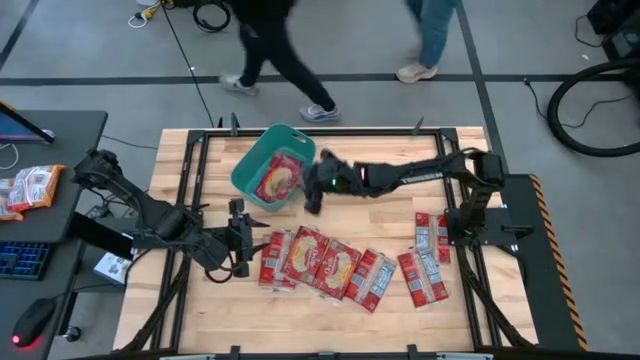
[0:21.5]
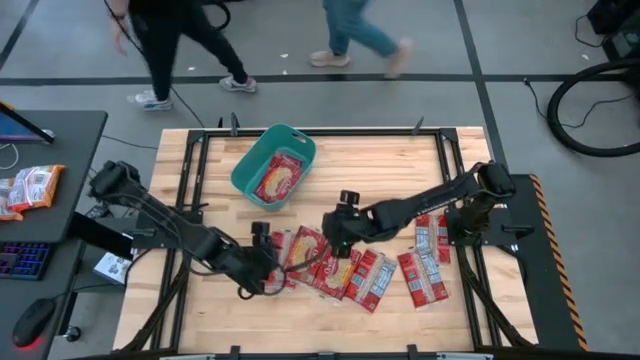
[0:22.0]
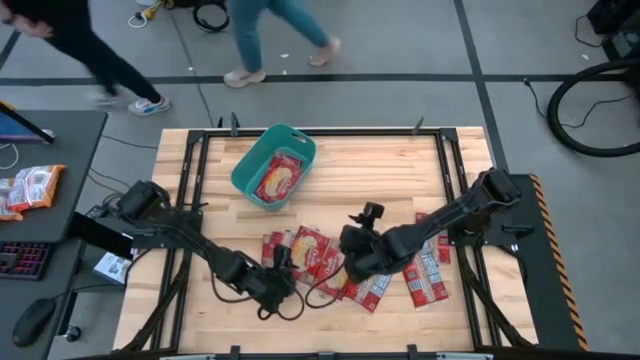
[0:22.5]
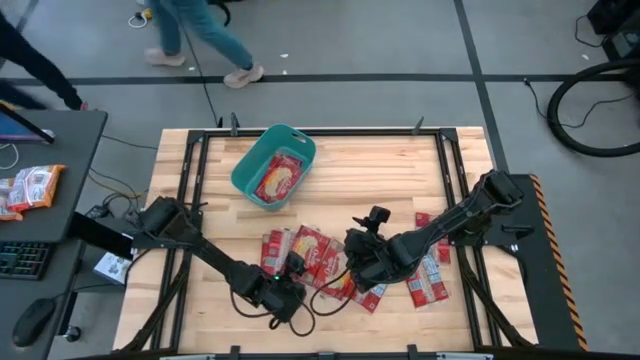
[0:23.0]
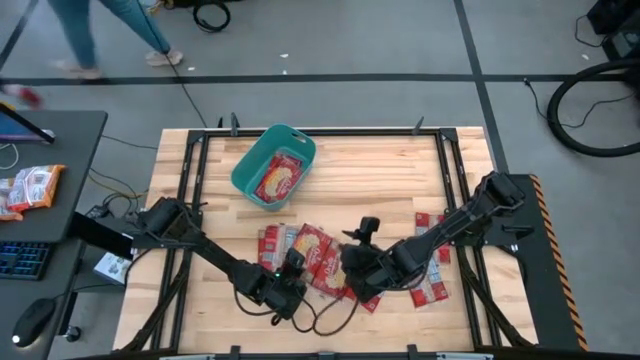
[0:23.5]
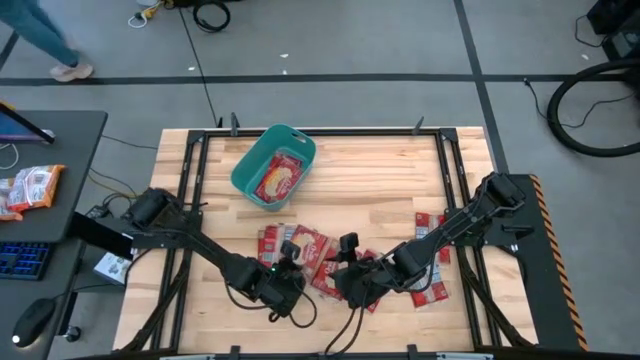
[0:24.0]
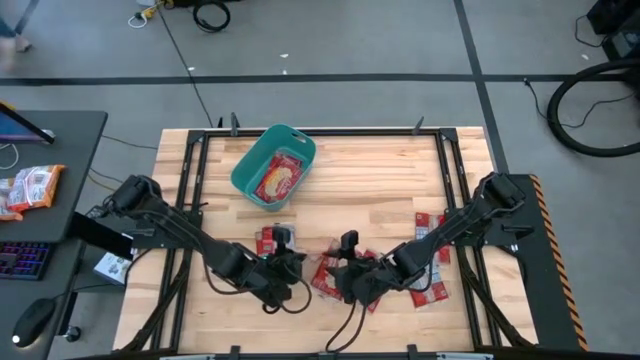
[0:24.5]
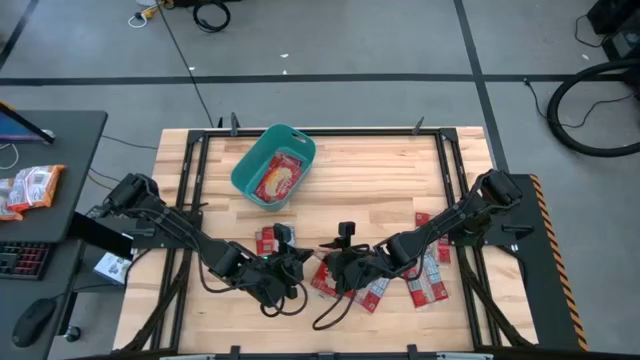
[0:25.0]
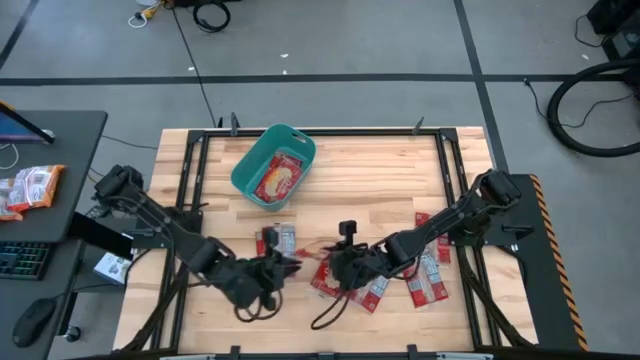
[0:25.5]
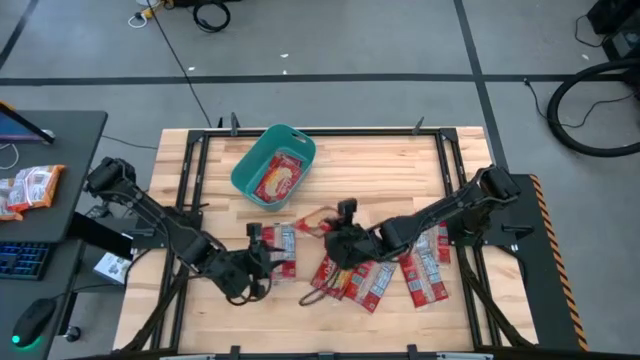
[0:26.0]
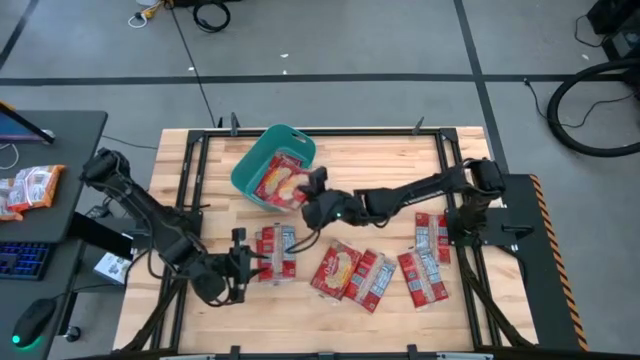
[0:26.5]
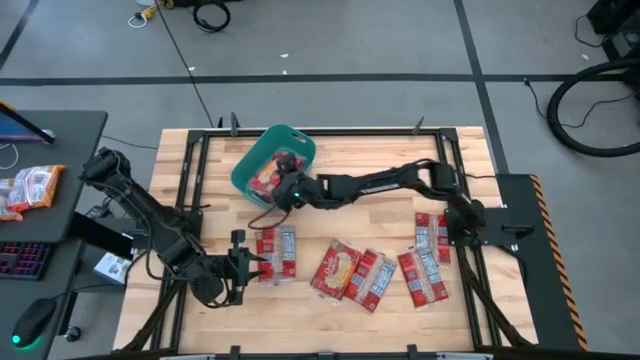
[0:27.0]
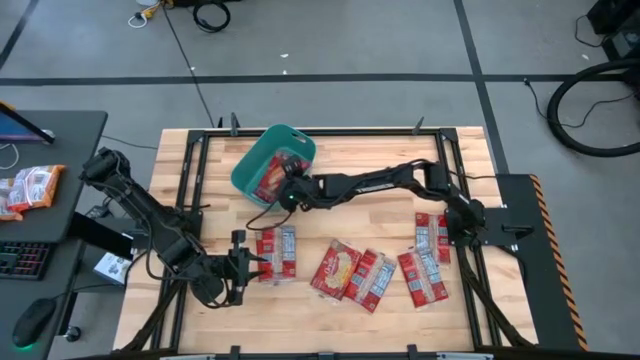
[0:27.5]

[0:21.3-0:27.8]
Task: Sort popcorn bags into baskets
Put the popcorn bag into the green bin

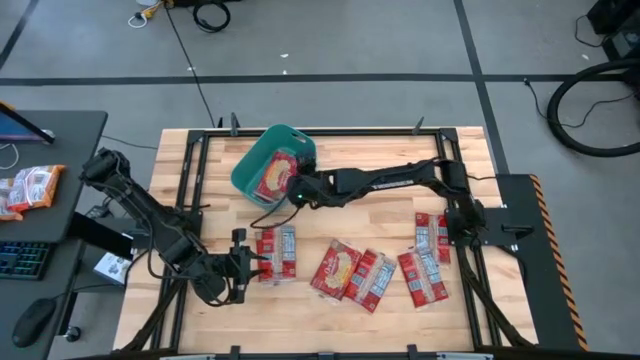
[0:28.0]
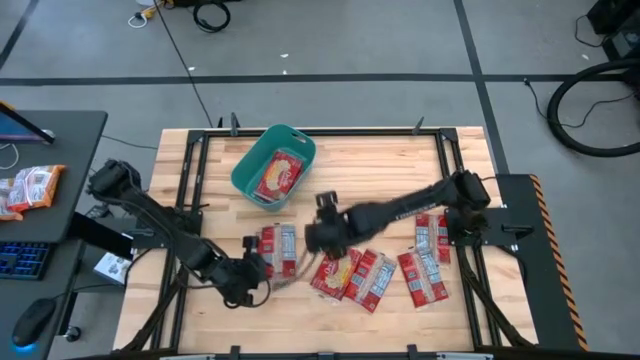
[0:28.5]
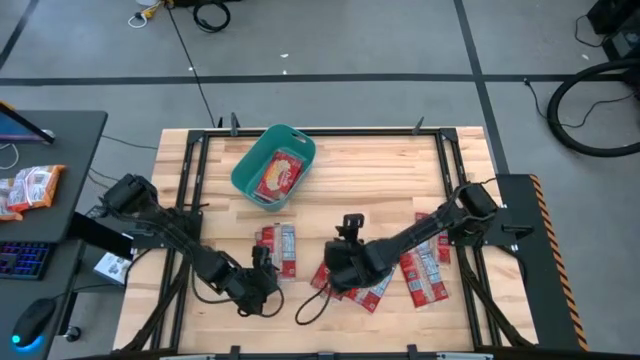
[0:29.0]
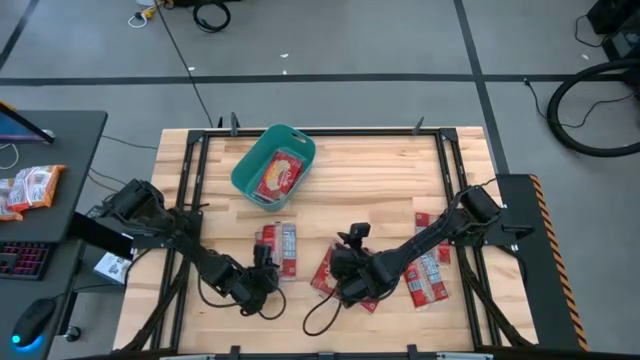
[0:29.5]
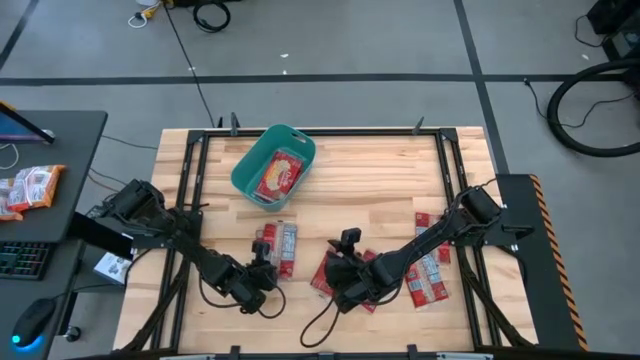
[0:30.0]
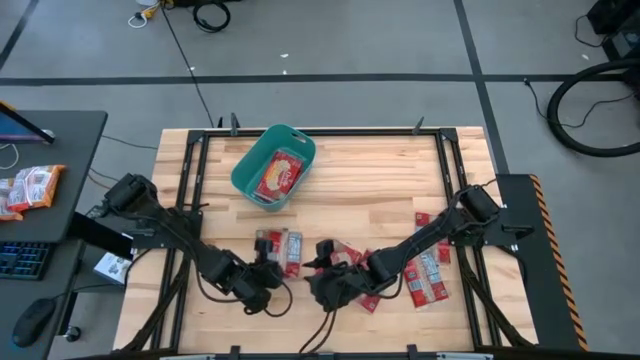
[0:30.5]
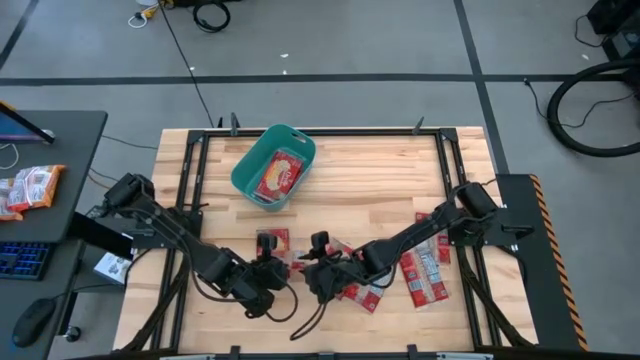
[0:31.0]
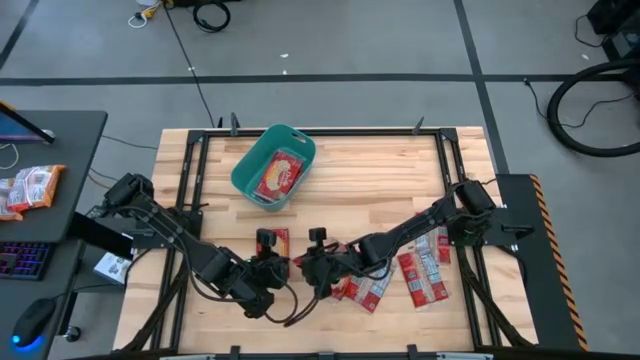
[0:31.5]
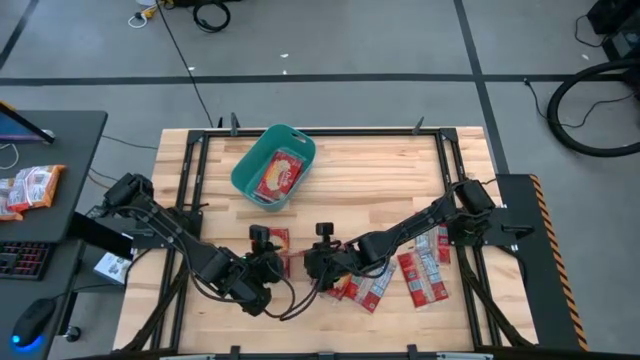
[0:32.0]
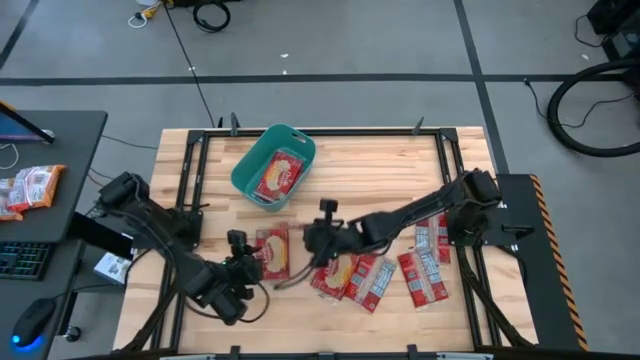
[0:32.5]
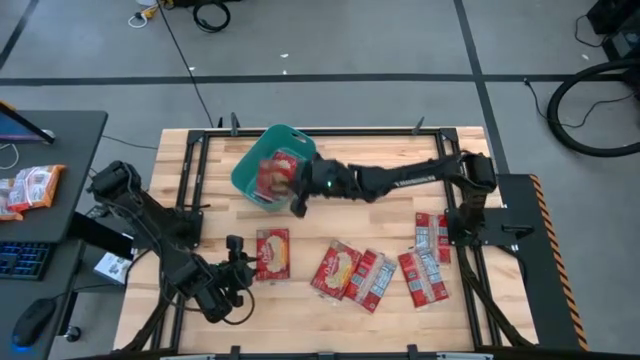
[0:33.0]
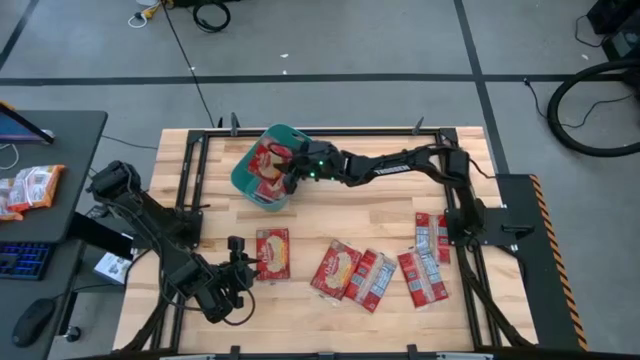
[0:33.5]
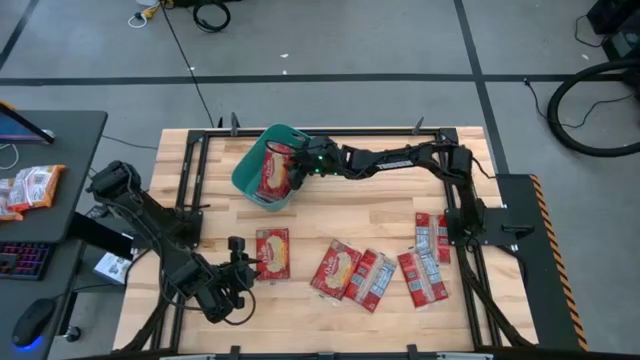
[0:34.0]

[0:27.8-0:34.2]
Put the popcorn bag into the green bin

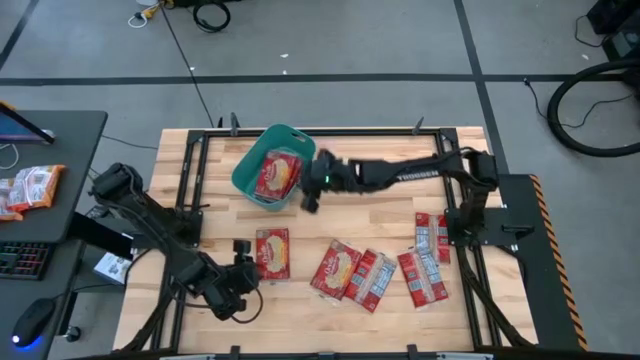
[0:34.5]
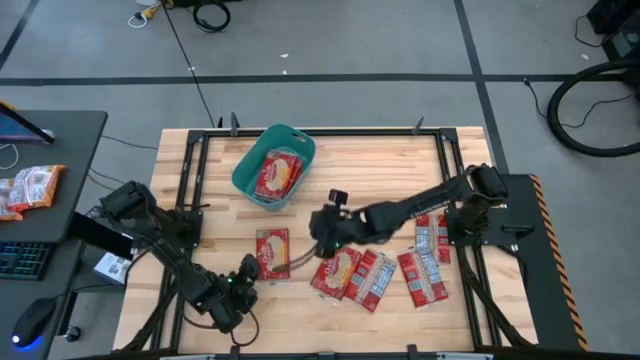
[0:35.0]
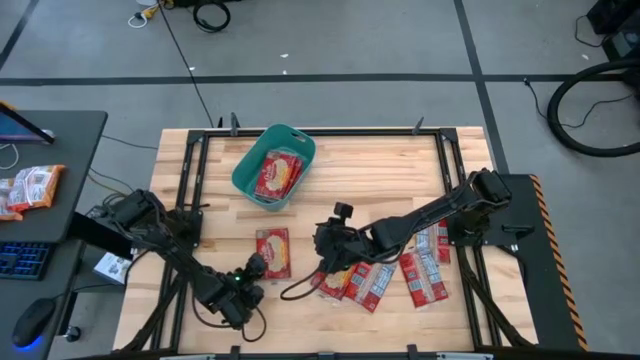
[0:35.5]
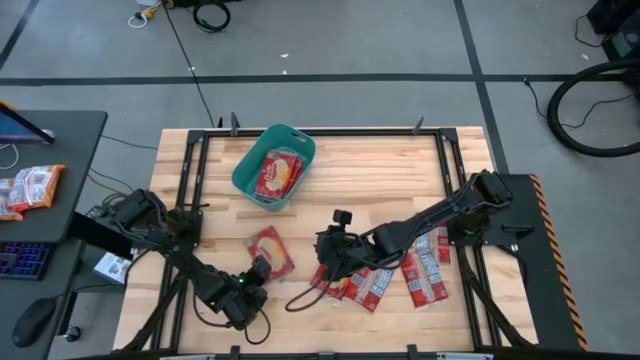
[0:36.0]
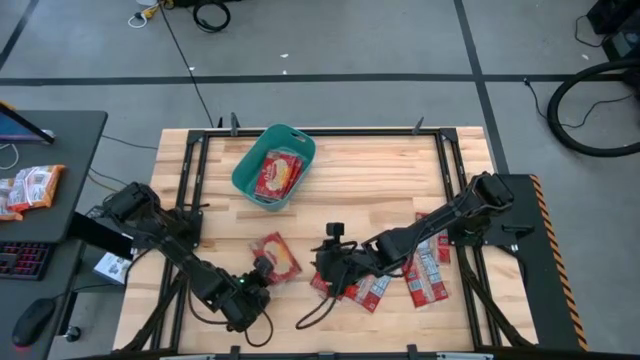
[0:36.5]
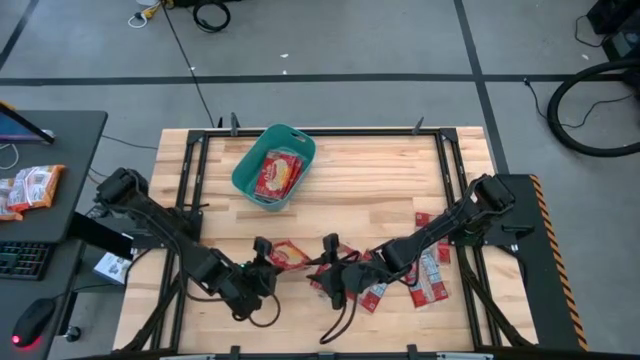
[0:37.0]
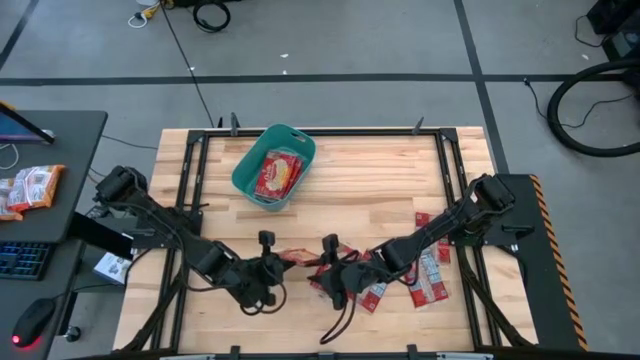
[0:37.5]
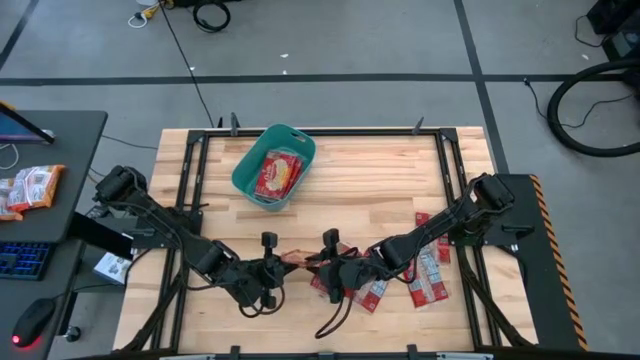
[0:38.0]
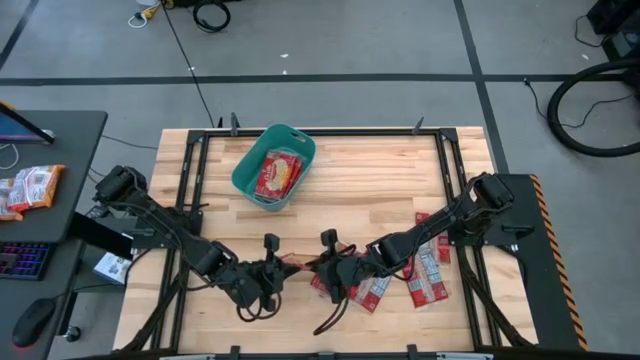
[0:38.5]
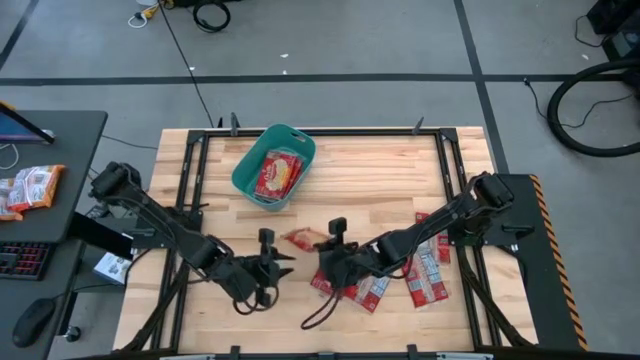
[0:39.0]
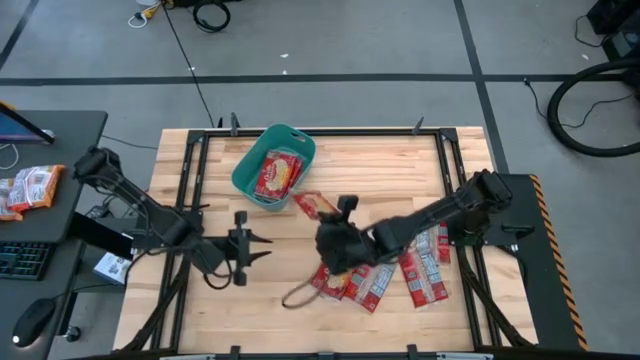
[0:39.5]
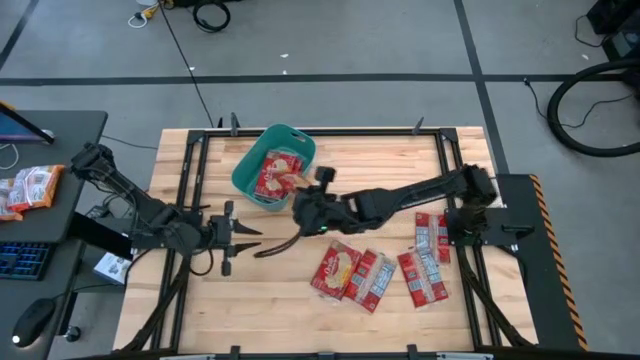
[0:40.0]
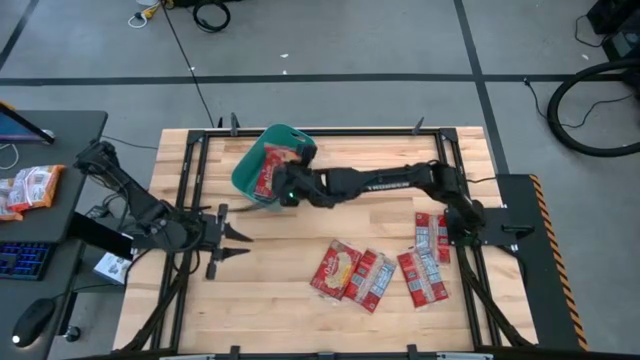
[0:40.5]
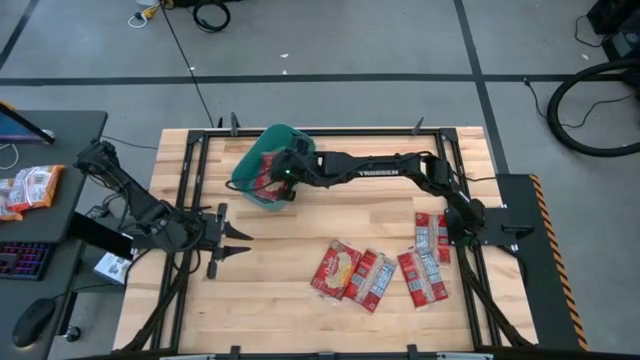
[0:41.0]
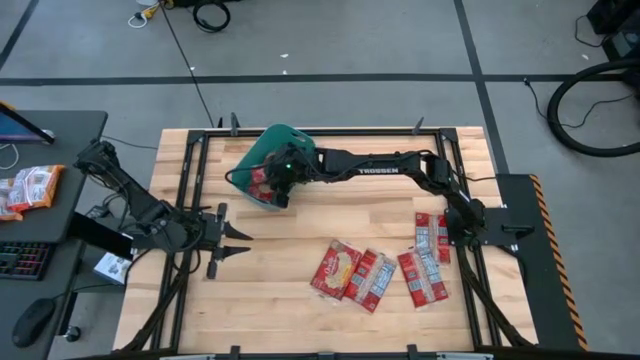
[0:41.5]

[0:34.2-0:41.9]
Put the popcorn bag into the green bin
